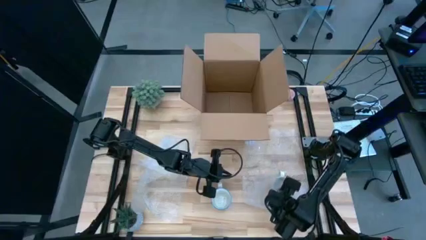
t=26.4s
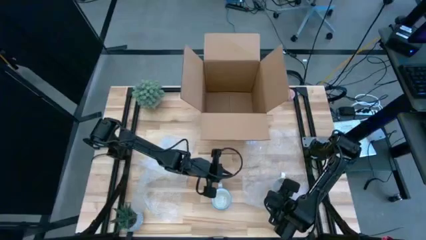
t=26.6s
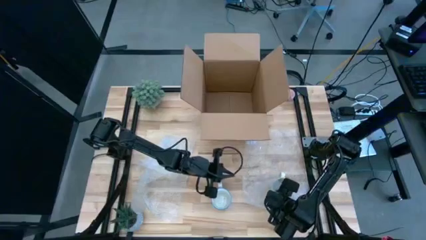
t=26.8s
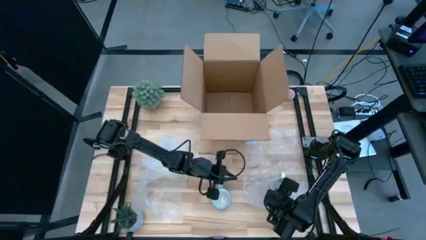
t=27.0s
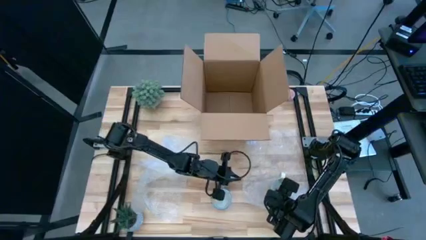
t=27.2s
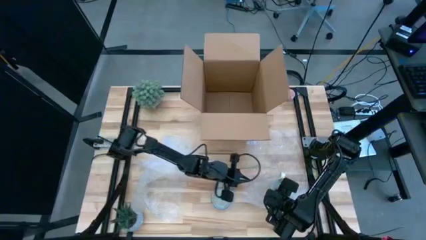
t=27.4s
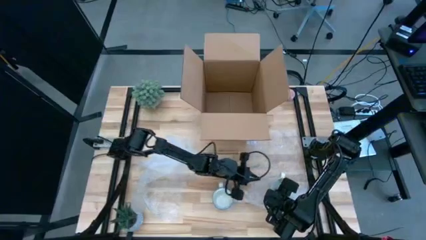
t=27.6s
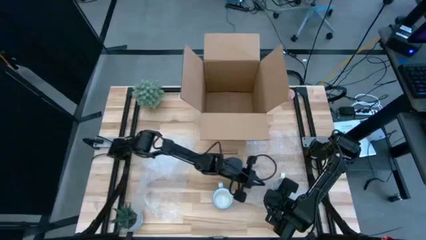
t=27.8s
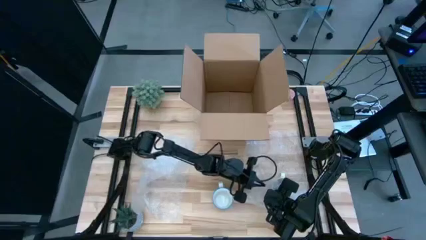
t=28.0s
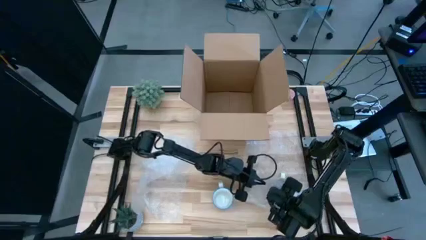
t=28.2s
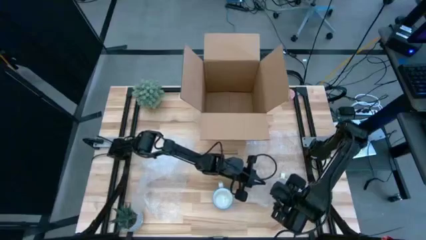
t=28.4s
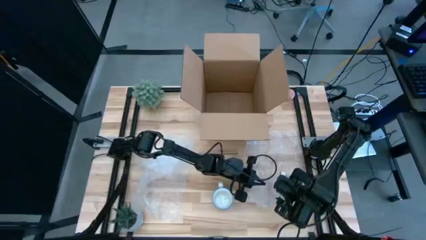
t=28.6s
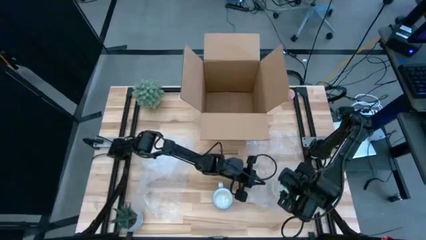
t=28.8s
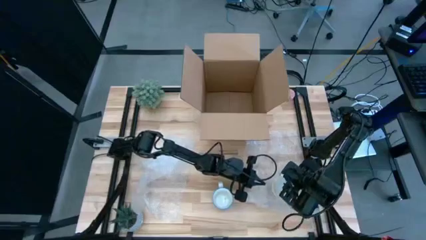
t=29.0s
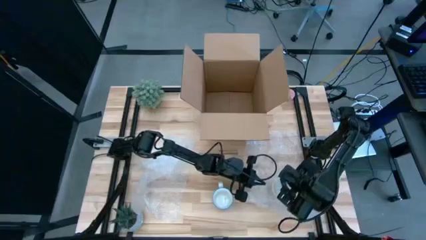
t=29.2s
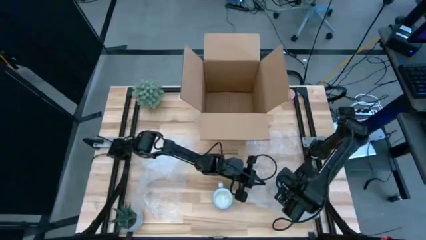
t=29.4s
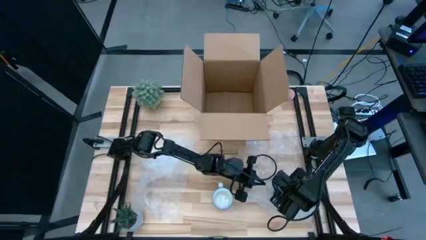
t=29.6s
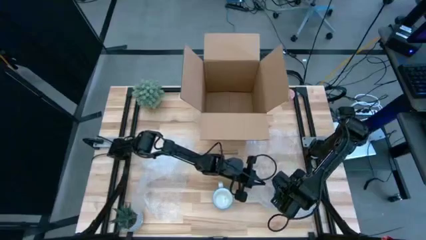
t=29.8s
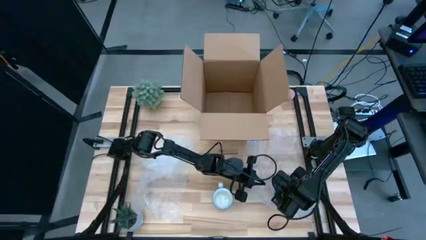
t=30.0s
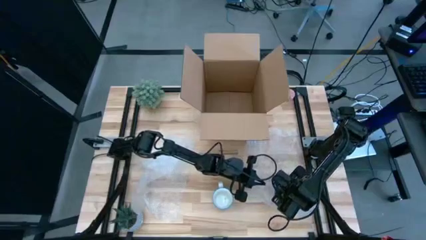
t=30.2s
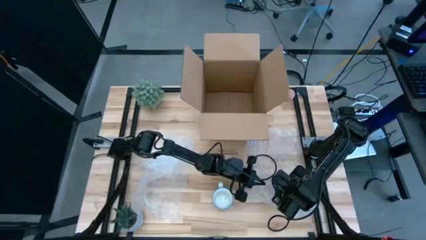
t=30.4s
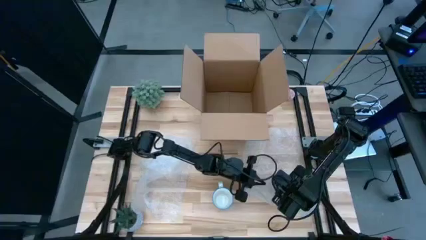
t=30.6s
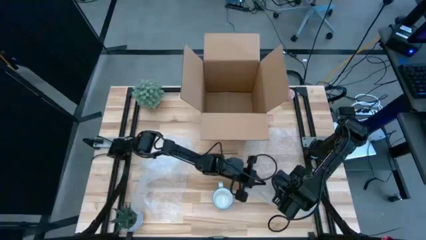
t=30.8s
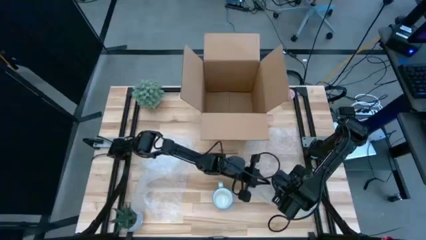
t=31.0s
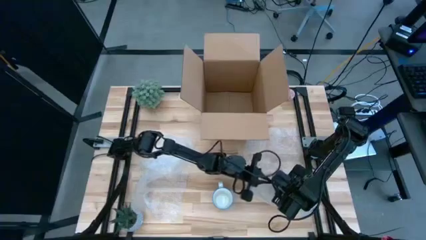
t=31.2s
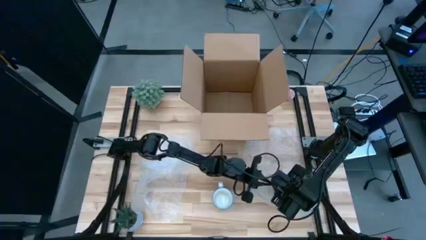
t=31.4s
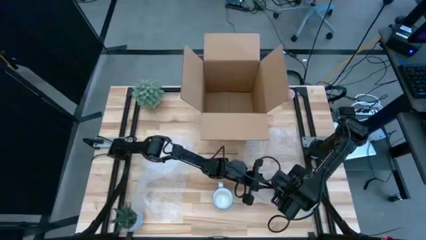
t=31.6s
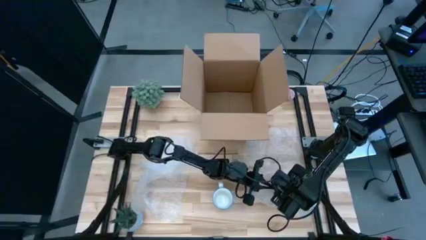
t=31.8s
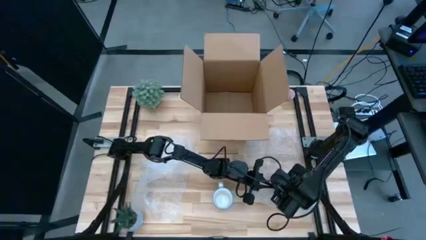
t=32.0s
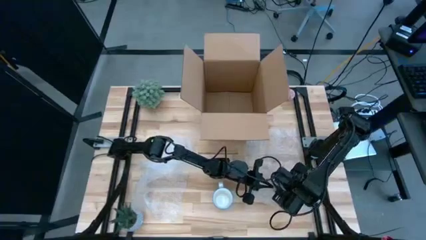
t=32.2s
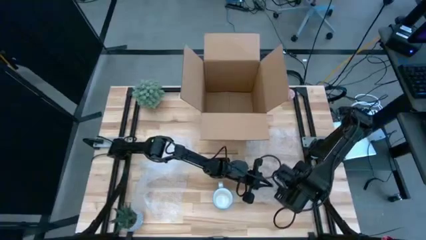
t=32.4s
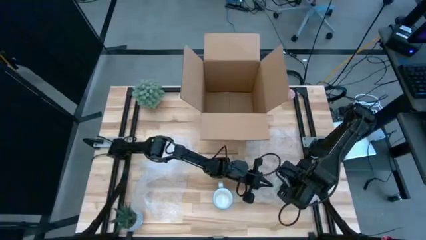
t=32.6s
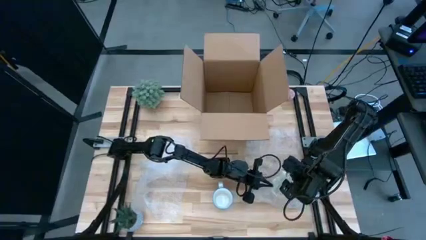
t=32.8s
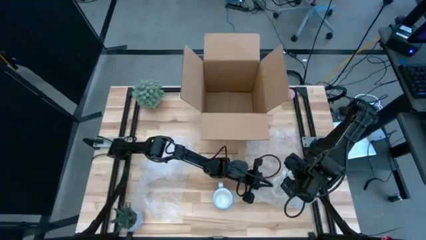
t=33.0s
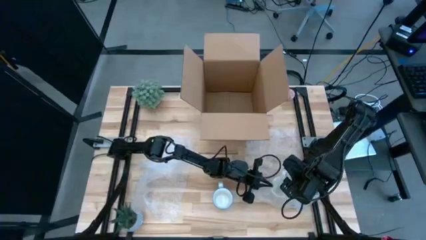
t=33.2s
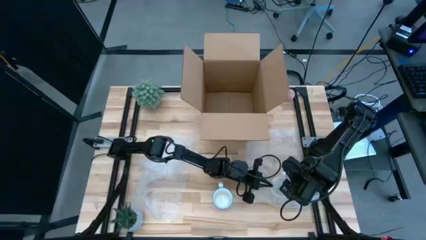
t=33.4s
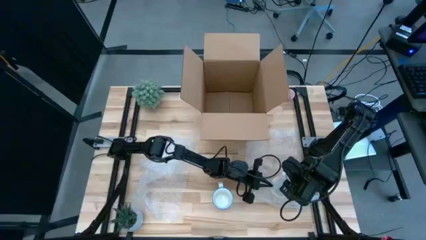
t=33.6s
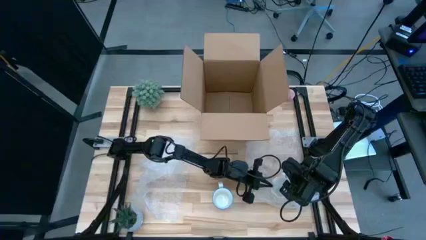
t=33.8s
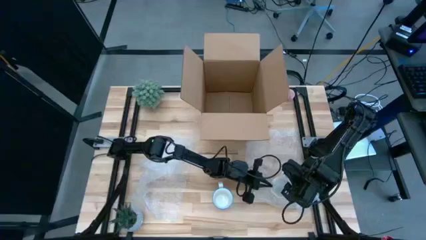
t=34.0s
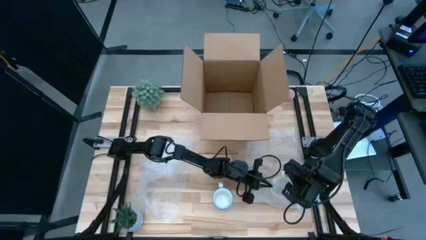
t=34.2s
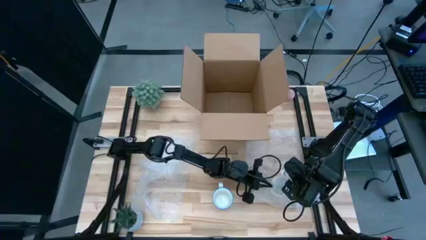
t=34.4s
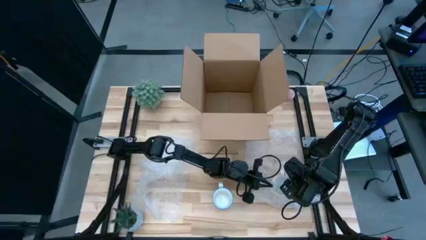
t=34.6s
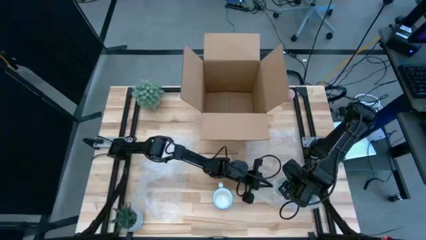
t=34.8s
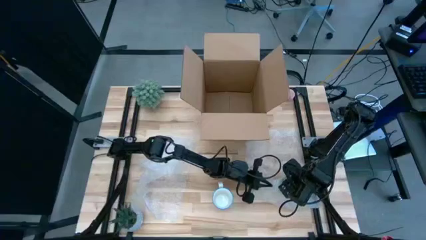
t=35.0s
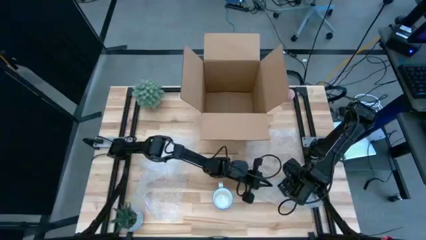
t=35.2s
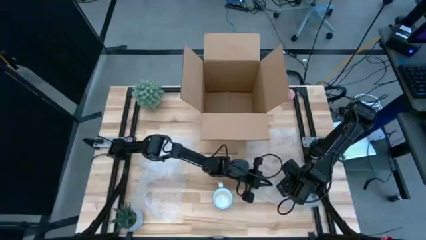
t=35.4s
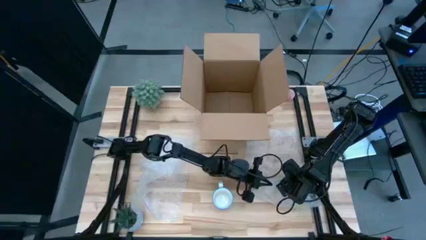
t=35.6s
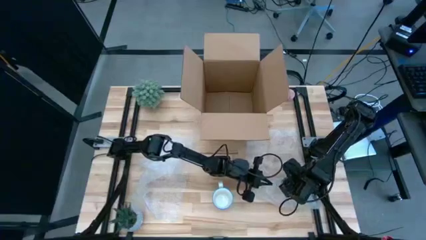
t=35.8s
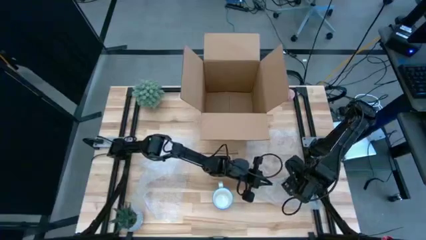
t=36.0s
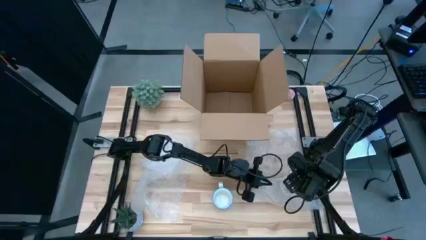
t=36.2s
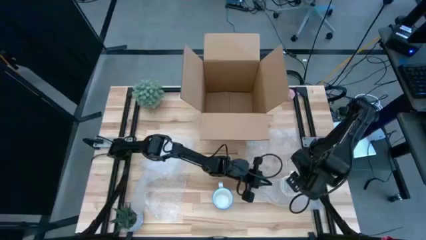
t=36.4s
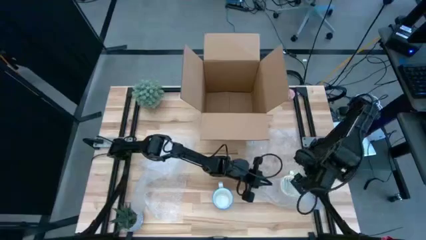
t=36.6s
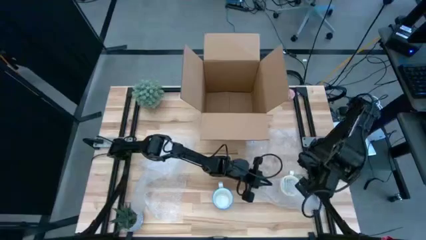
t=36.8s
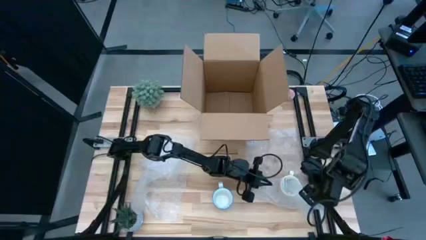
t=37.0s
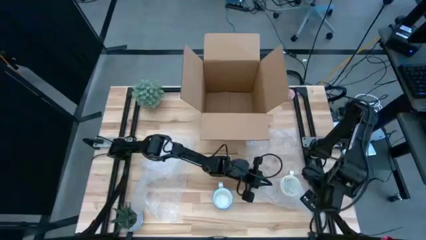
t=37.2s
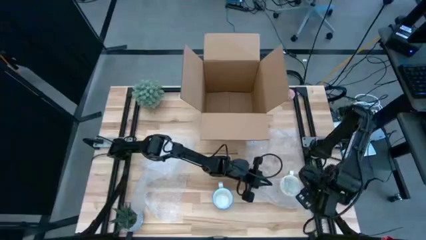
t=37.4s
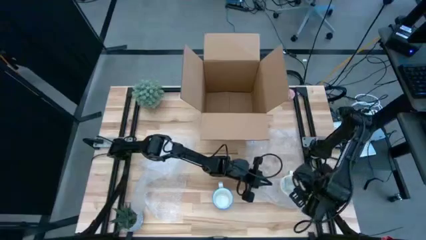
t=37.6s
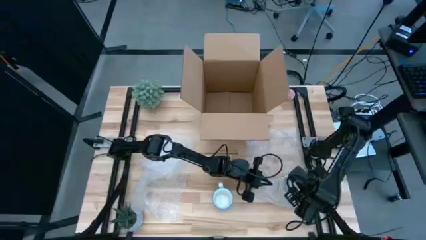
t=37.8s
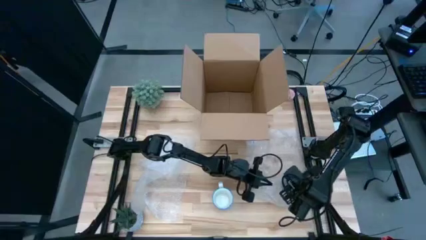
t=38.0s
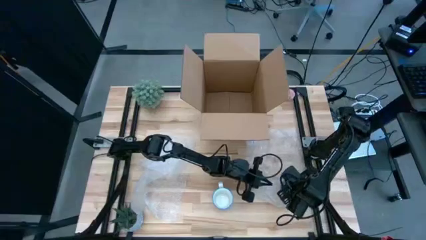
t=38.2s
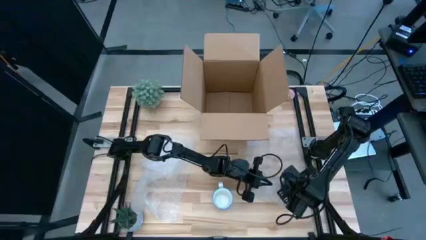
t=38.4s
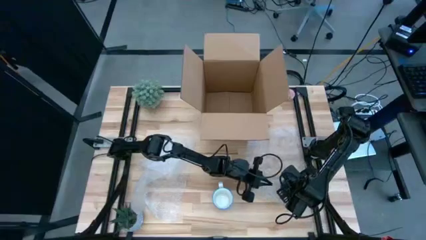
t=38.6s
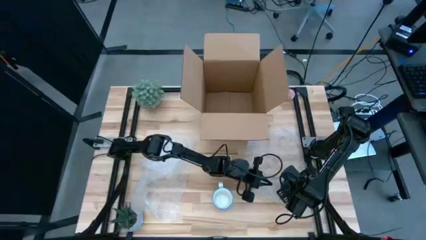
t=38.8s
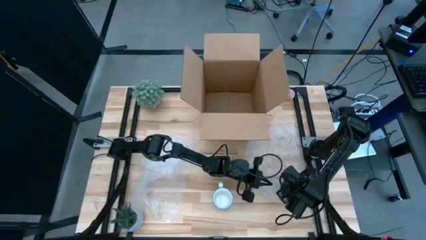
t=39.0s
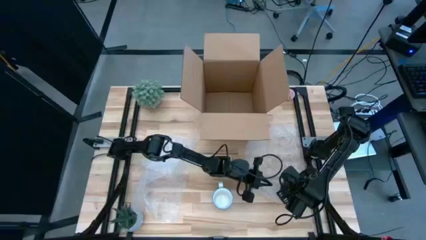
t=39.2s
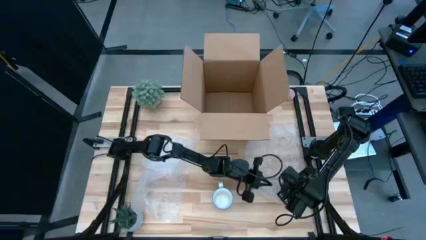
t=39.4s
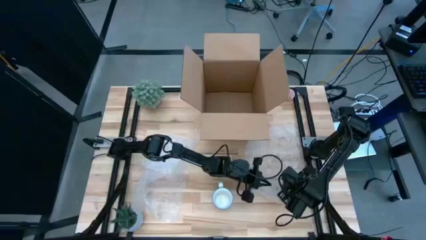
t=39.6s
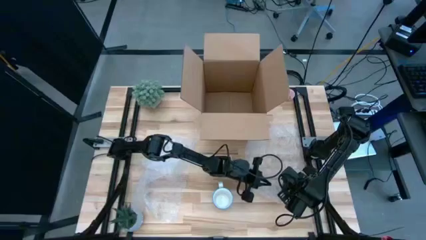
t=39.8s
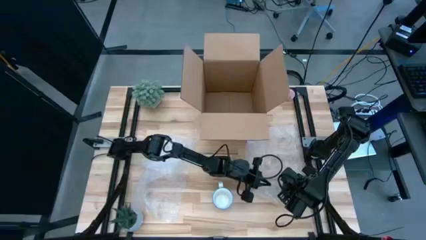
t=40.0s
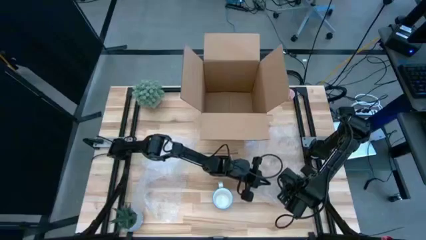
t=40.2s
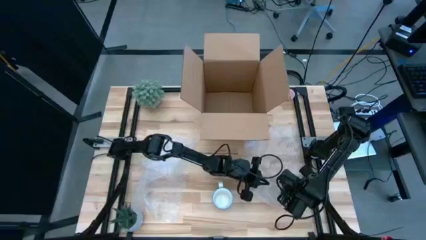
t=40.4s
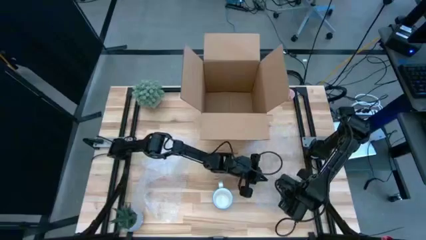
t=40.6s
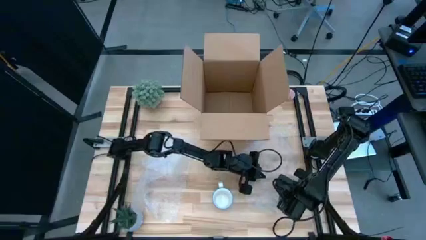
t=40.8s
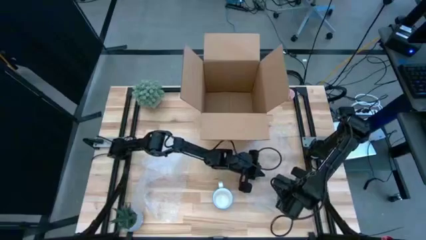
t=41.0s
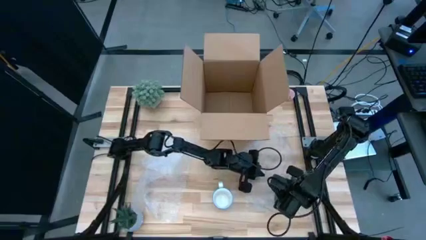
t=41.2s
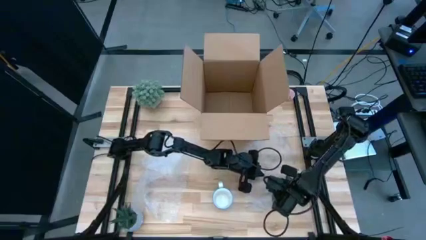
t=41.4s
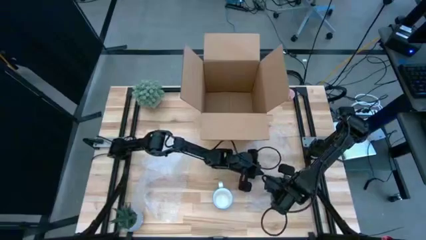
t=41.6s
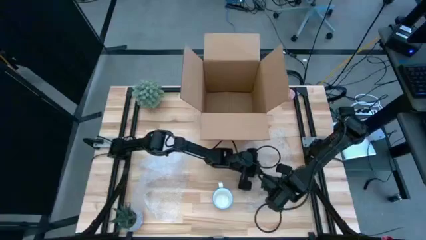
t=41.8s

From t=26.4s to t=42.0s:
Task: wrap mug
Wrap the yellow mug with the bubble wrap
